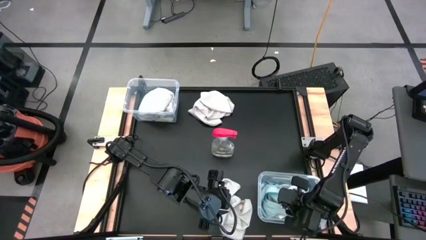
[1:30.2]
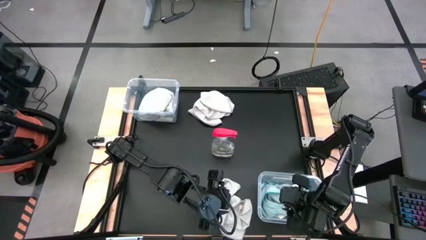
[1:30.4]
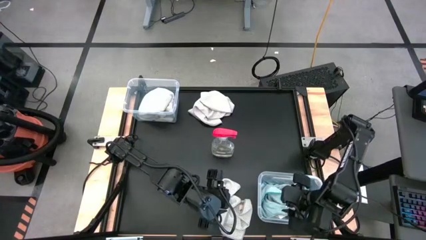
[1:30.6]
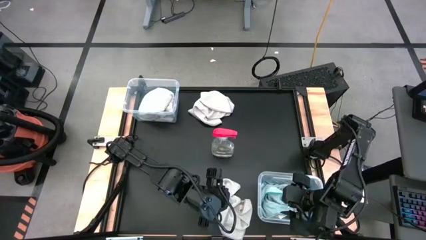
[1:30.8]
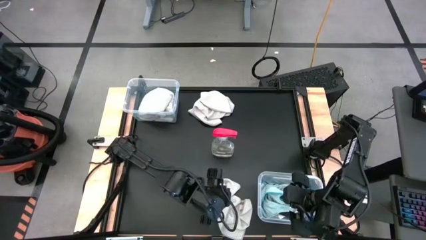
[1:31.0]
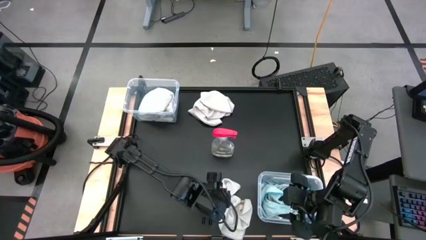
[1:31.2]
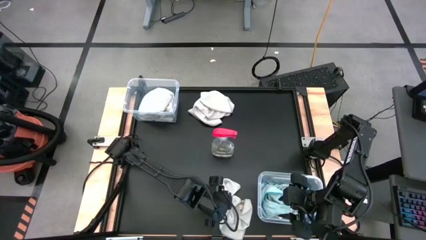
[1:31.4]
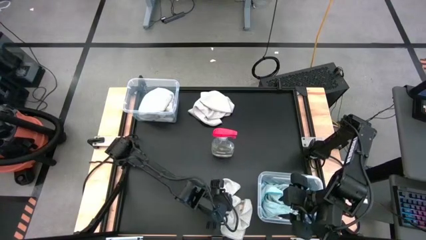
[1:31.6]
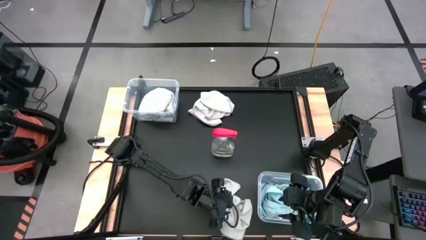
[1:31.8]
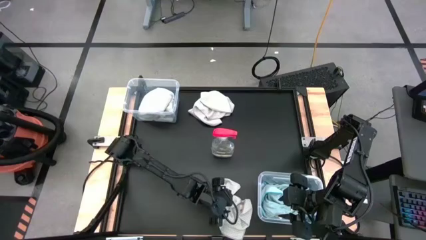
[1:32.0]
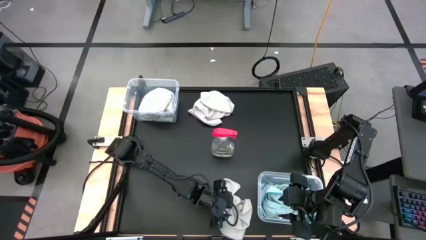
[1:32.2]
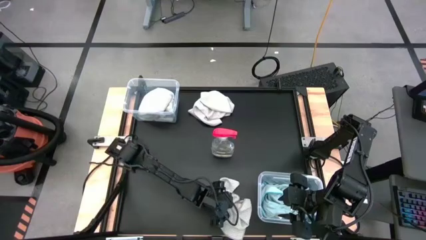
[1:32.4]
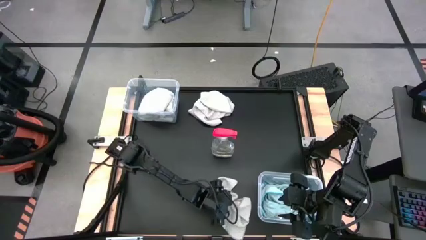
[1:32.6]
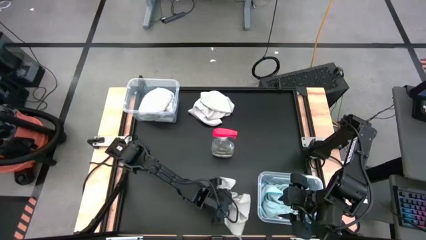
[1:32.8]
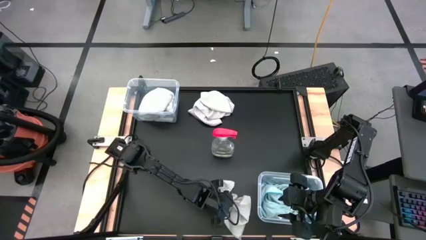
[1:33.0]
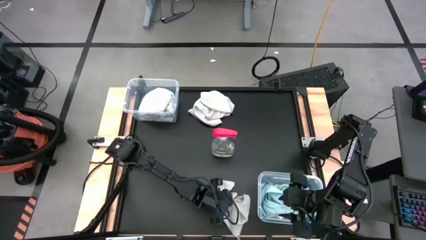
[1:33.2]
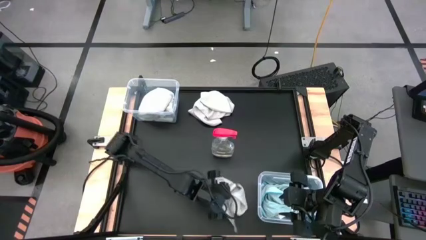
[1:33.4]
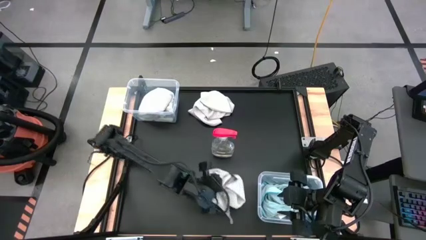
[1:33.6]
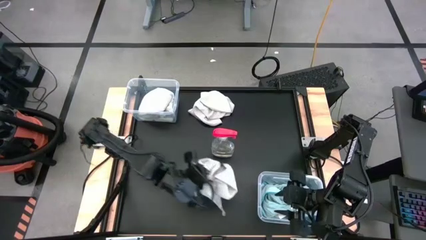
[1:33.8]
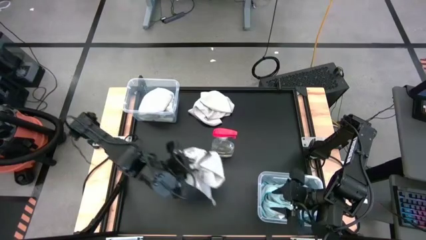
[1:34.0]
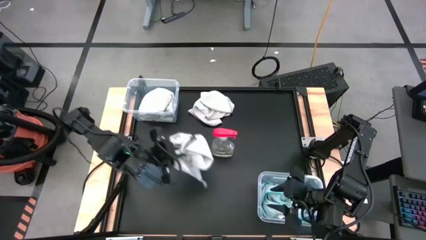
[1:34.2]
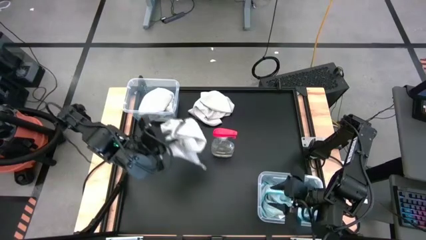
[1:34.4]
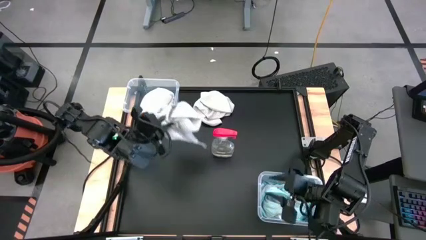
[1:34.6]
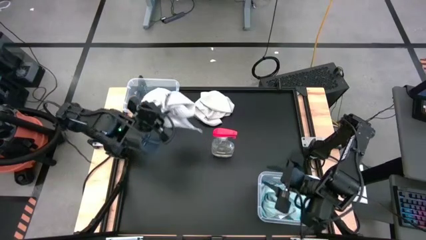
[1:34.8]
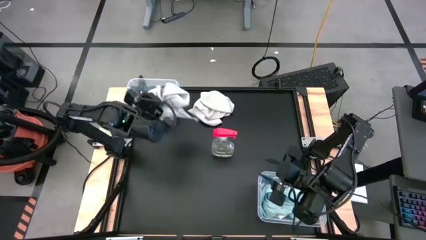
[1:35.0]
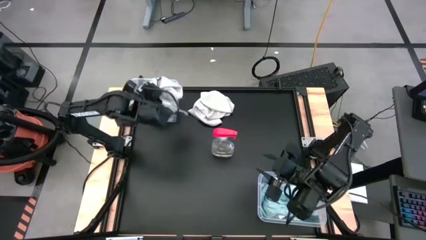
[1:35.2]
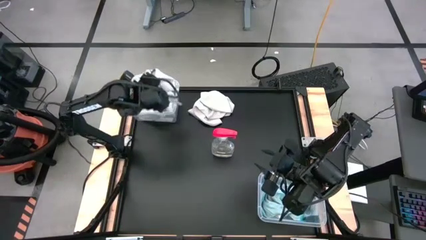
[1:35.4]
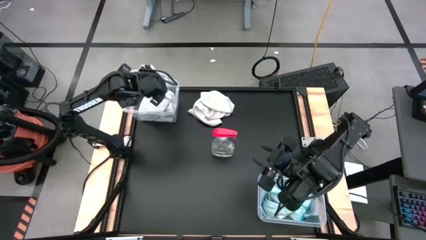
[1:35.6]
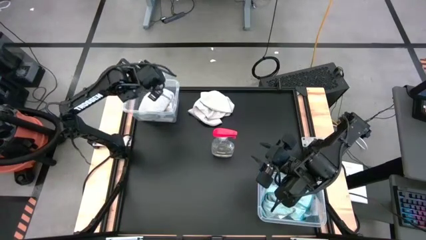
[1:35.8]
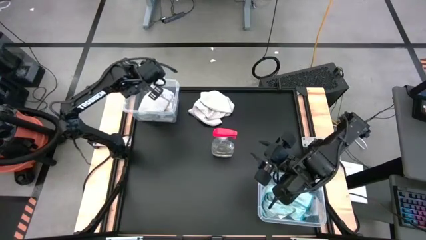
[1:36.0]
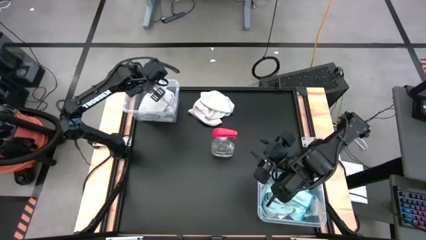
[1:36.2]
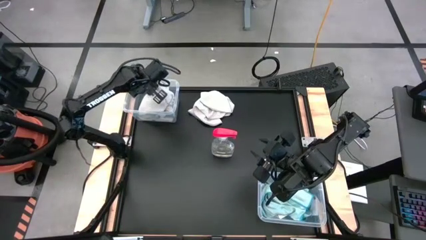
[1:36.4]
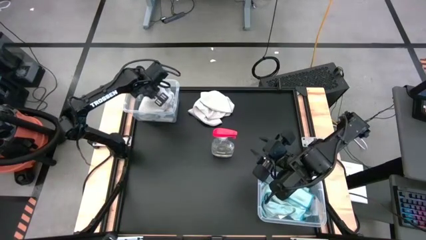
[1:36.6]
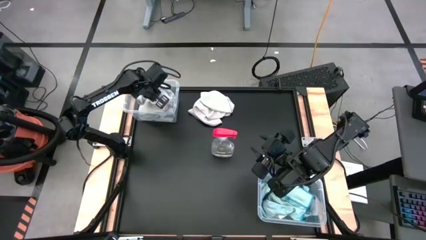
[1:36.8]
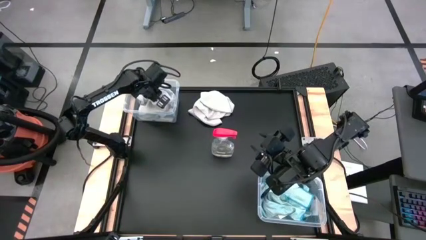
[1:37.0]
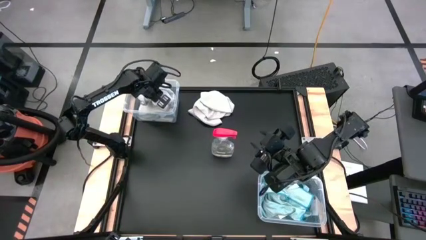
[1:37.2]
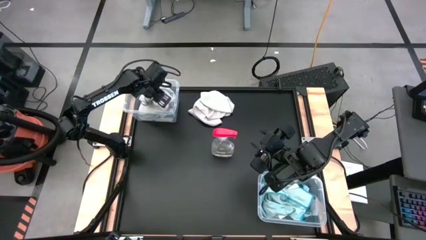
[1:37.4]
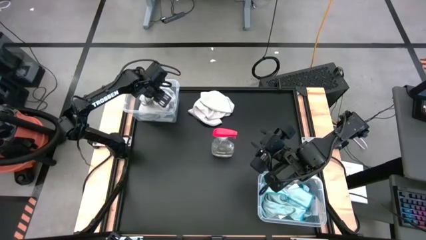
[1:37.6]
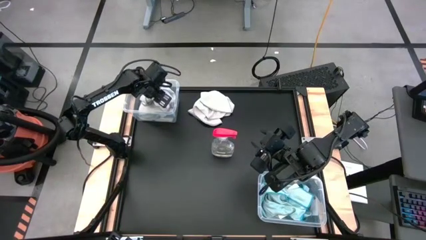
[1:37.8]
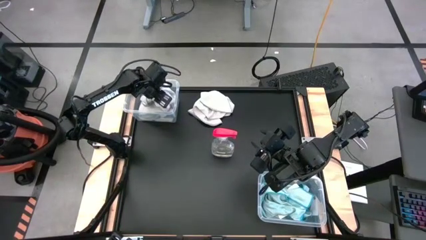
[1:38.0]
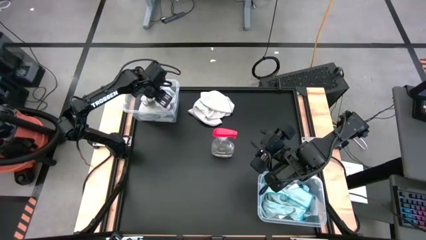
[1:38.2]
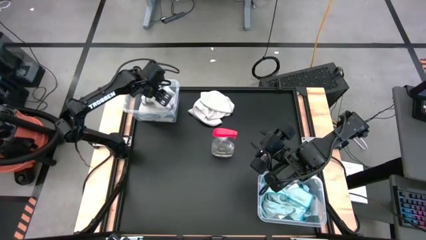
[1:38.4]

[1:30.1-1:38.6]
Task: Sort microfiber towel by color & place in baskets
Put the gray towel into the top transparent bin

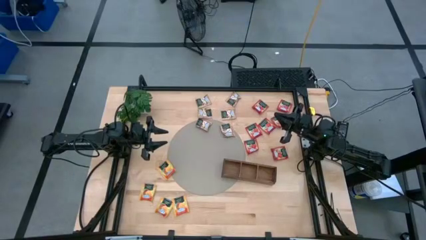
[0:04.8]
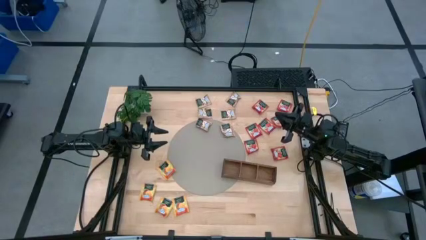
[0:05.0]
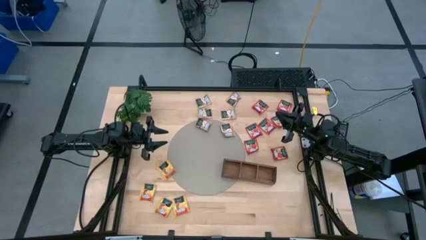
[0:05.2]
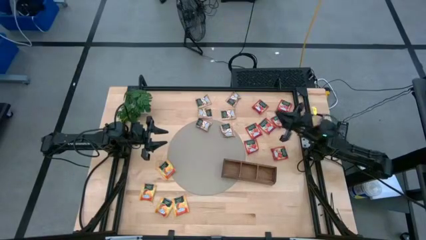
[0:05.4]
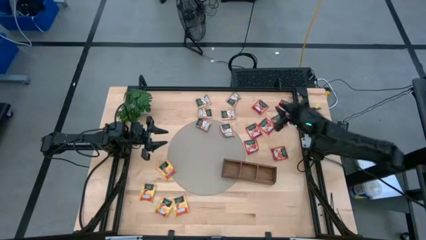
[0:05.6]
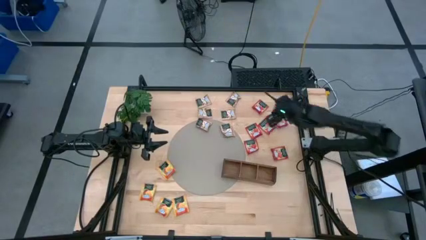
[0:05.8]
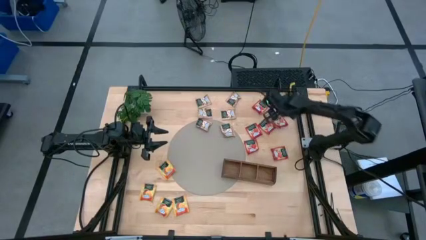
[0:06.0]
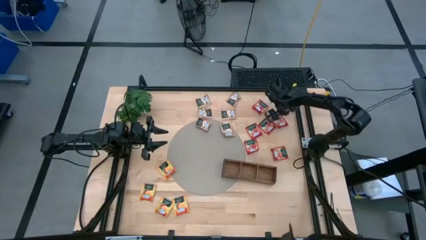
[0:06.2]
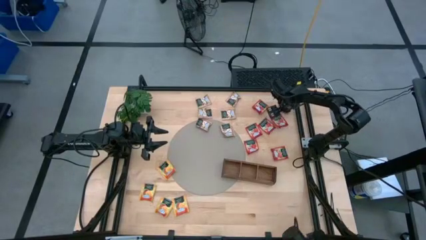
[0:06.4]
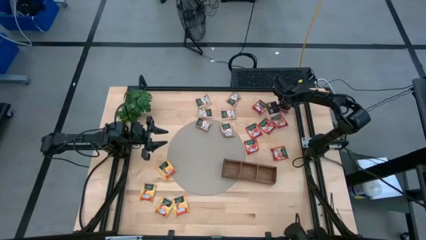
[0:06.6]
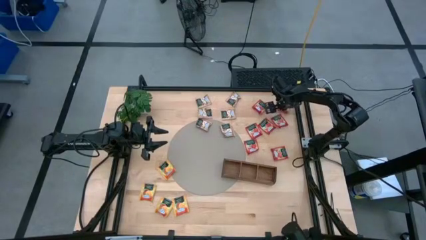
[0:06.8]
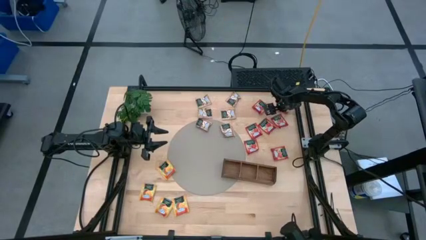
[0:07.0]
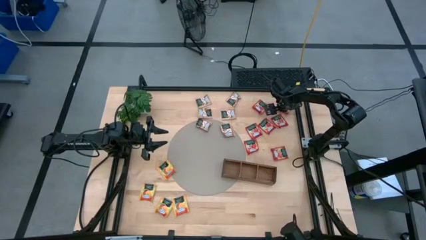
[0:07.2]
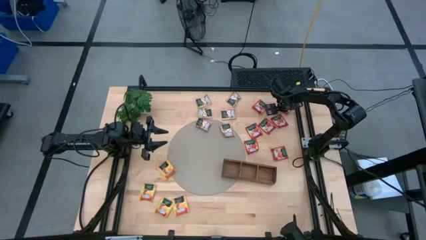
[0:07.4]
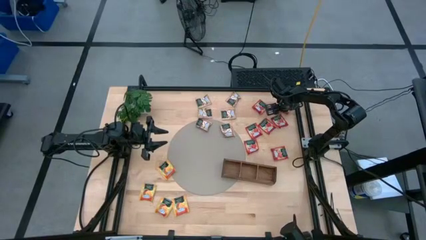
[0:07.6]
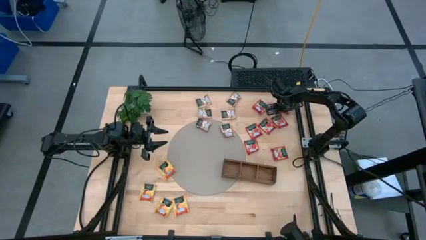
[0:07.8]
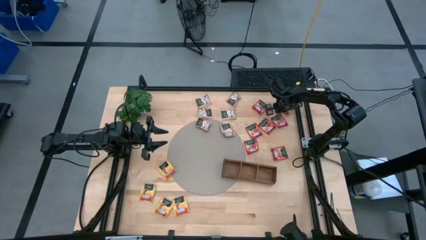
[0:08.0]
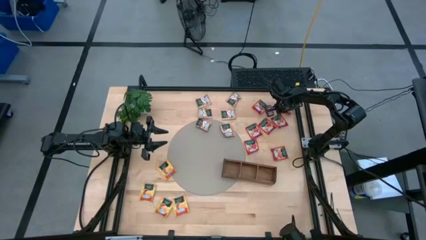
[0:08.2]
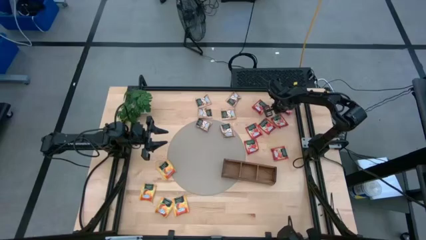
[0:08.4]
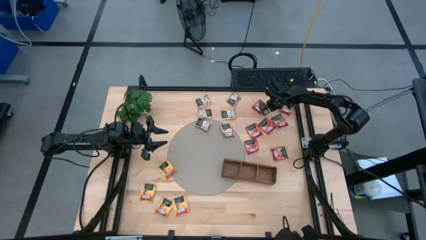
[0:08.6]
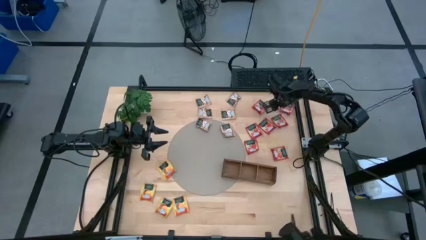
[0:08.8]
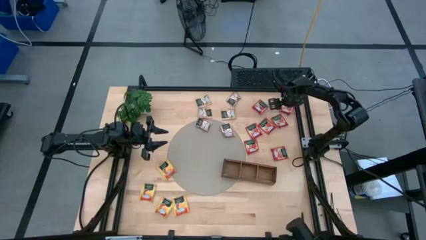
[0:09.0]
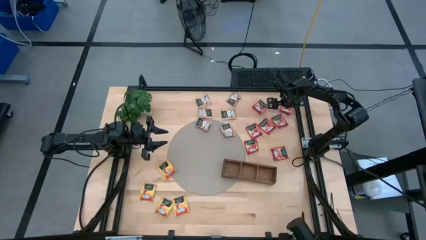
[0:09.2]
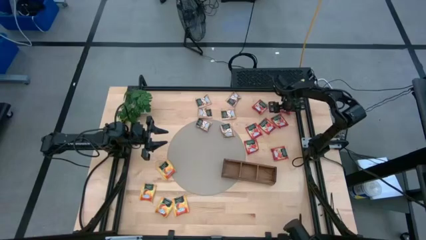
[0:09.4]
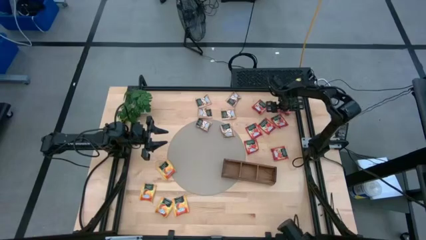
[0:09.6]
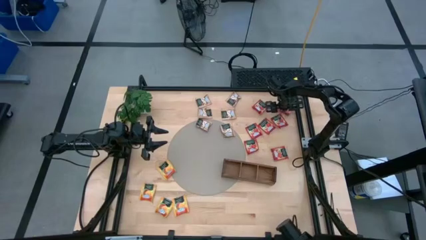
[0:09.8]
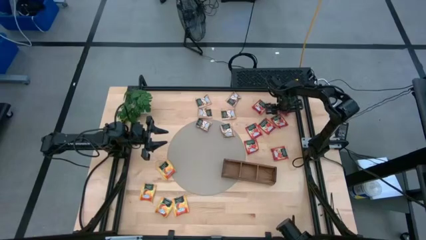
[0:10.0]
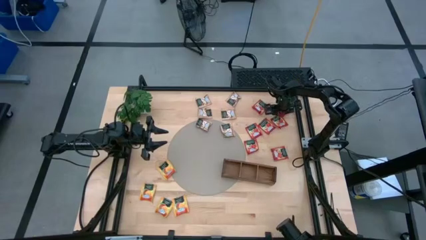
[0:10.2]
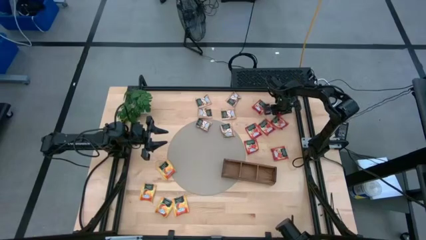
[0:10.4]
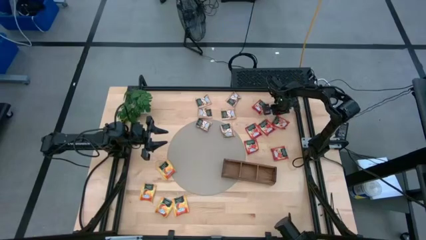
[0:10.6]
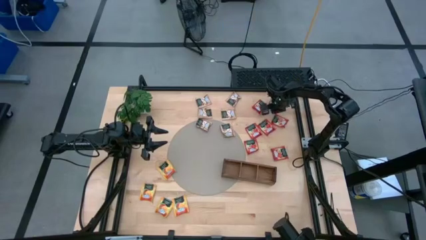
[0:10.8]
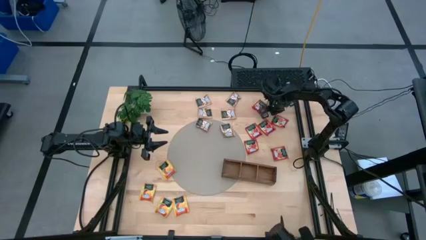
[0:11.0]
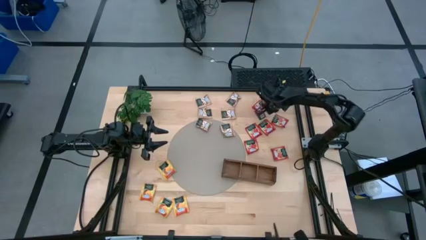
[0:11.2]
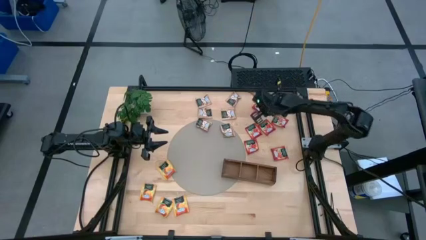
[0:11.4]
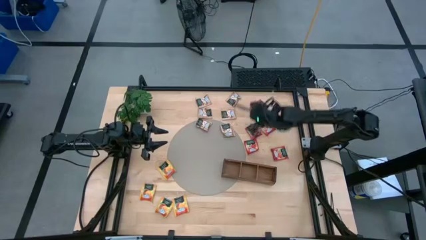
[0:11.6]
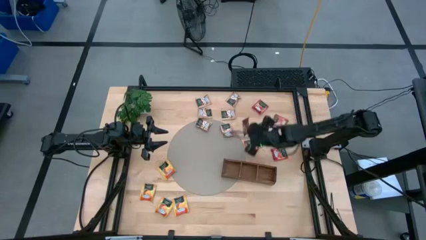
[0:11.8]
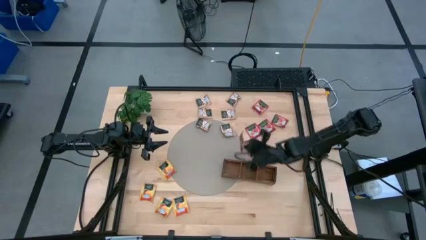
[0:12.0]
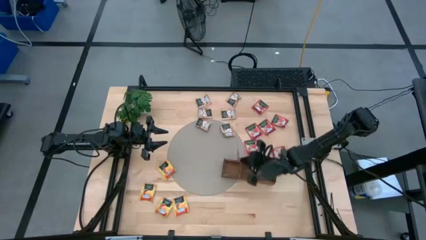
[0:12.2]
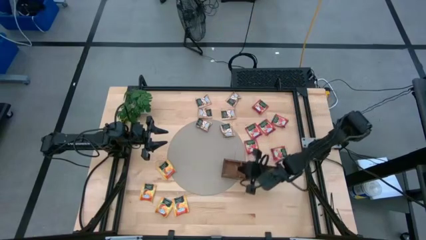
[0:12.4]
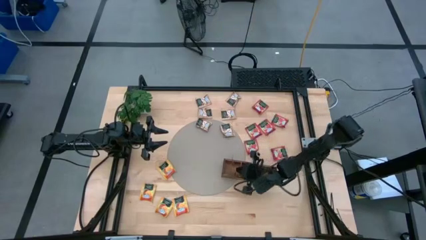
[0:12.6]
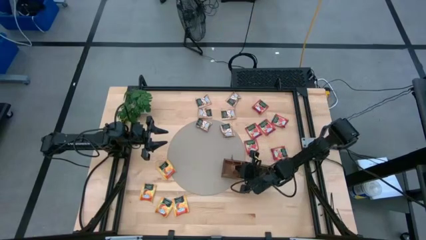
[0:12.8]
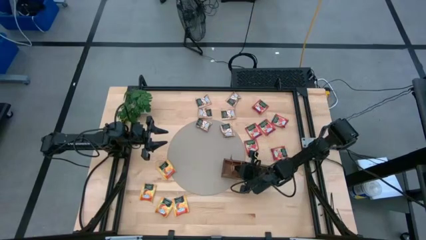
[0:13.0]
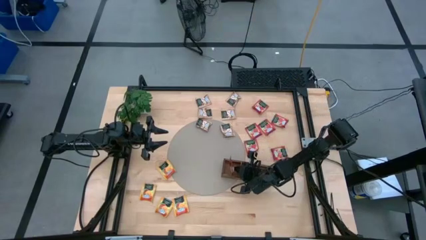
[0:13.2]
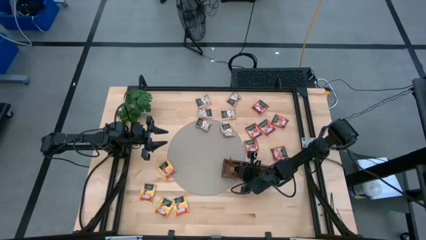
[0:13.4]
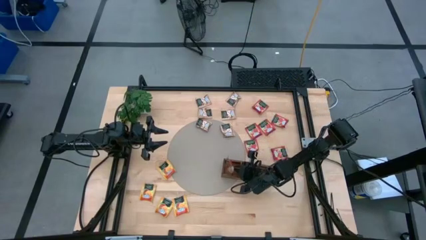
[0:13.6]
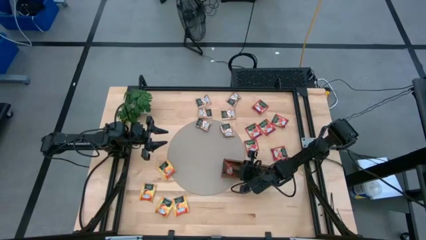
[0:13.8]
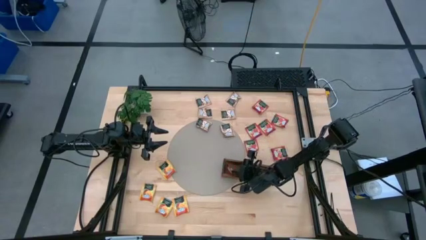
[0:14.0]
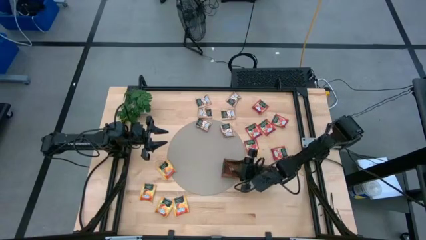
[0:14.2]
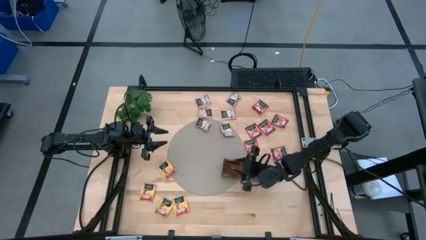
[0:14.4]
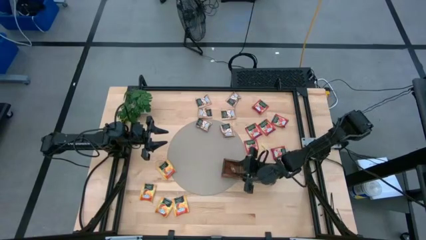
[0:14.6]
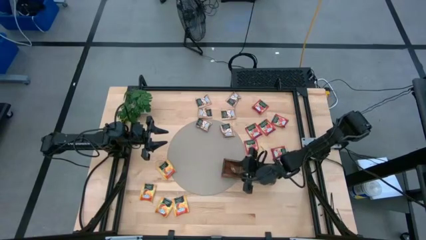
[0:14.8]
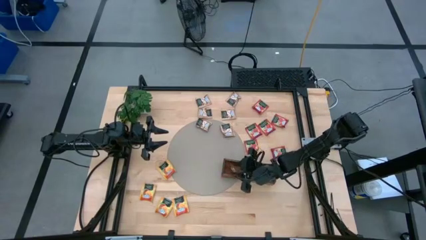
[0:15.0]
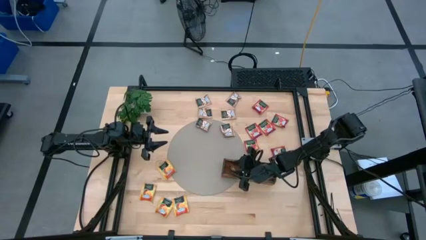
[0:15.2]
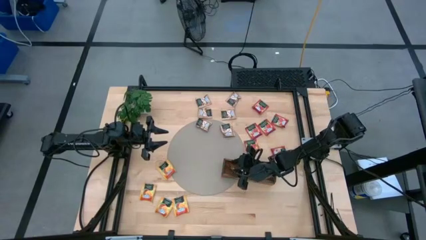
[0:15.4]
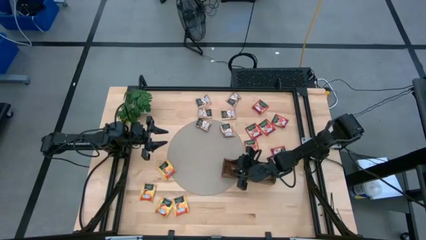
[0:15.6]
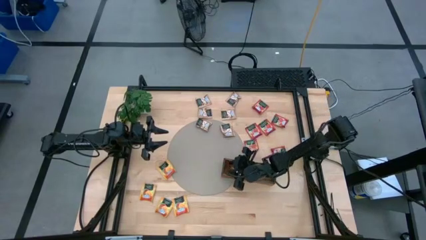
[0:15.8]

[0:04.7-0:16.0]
Task: Pick & Place Tea
Put the red tea bag into the left section of the wooden organizer
